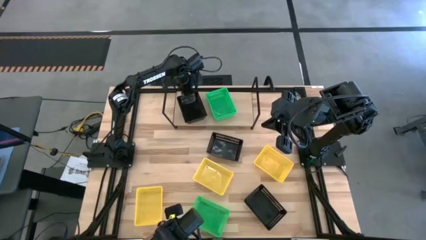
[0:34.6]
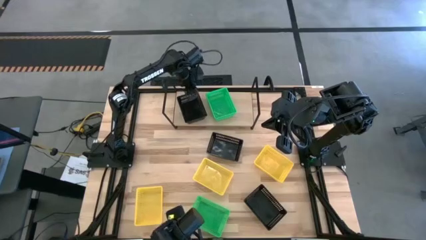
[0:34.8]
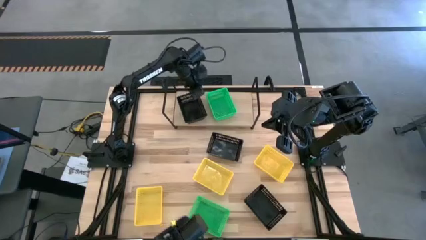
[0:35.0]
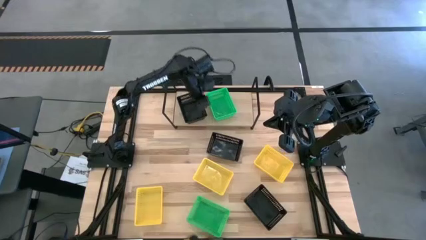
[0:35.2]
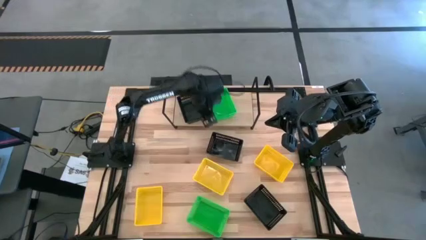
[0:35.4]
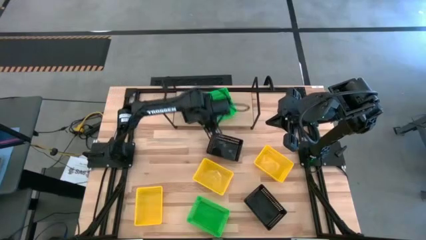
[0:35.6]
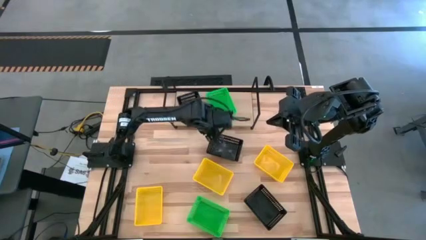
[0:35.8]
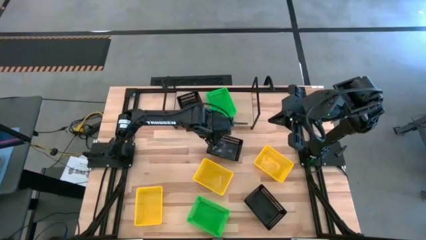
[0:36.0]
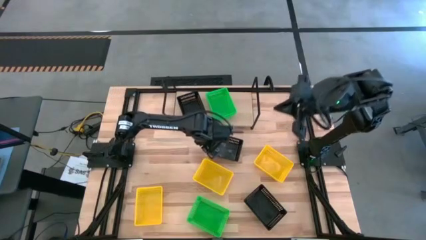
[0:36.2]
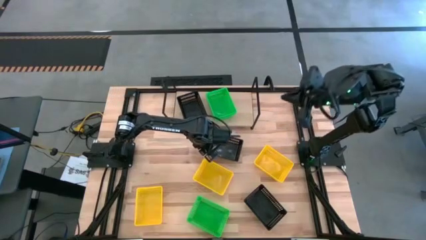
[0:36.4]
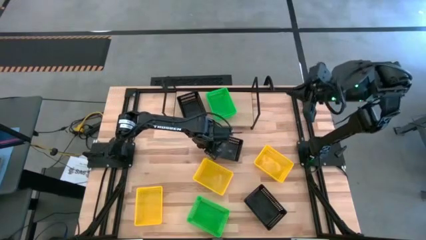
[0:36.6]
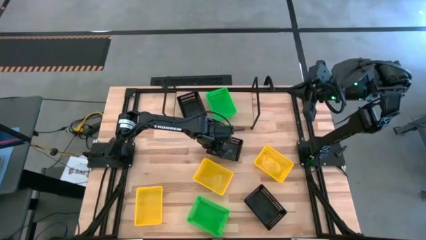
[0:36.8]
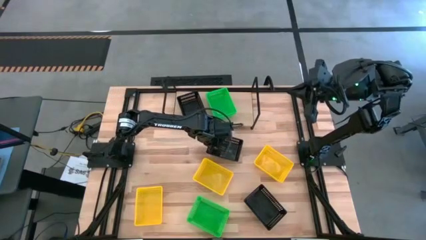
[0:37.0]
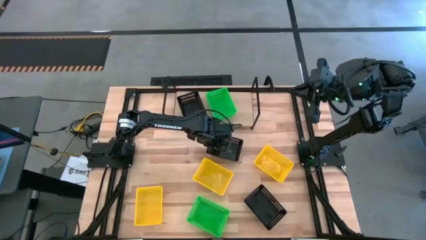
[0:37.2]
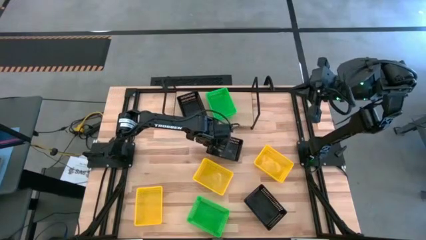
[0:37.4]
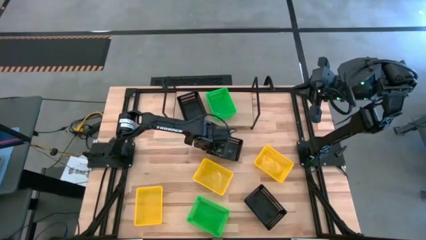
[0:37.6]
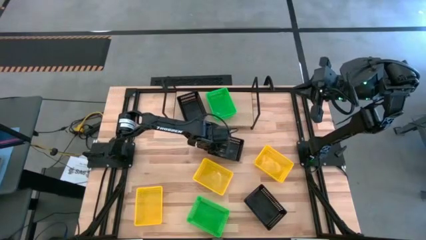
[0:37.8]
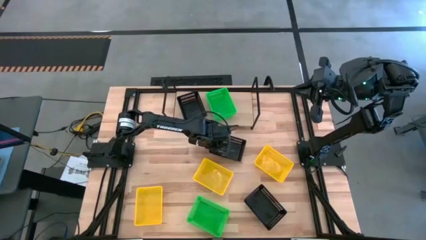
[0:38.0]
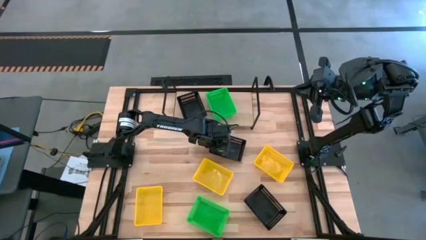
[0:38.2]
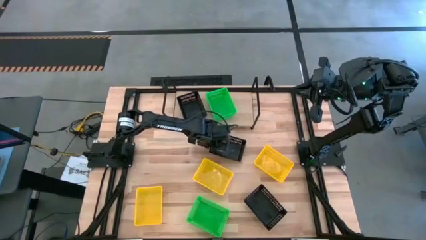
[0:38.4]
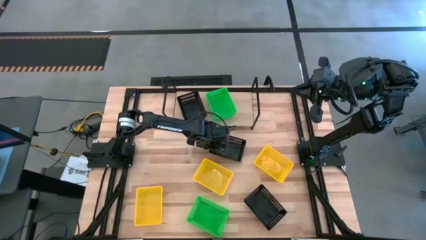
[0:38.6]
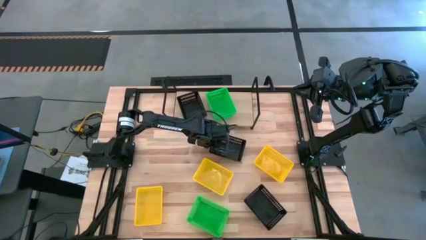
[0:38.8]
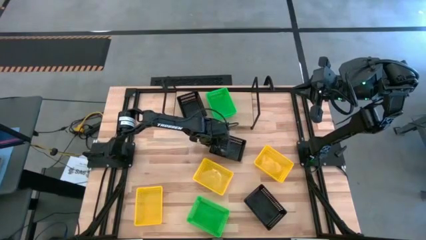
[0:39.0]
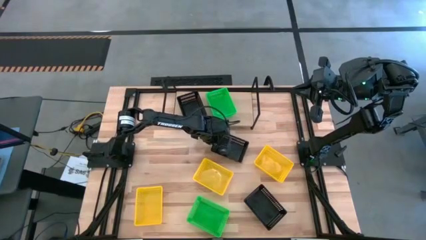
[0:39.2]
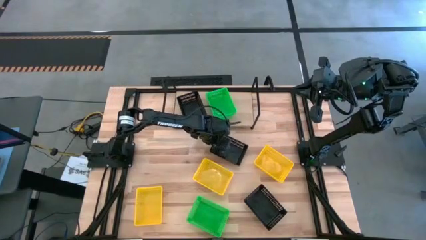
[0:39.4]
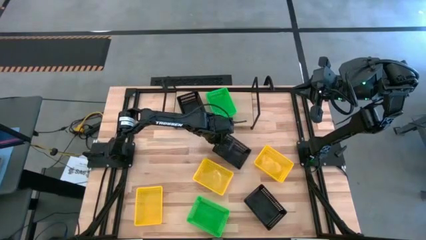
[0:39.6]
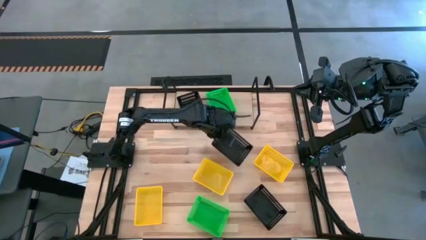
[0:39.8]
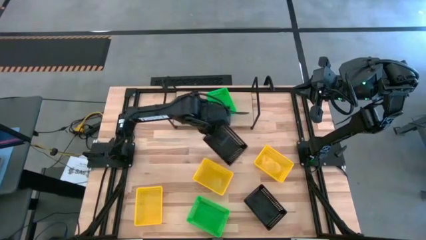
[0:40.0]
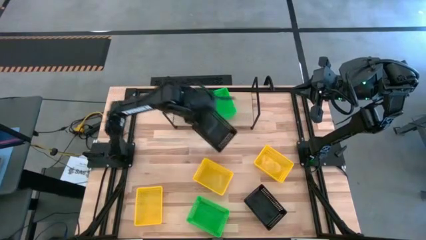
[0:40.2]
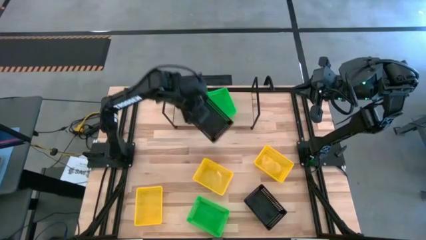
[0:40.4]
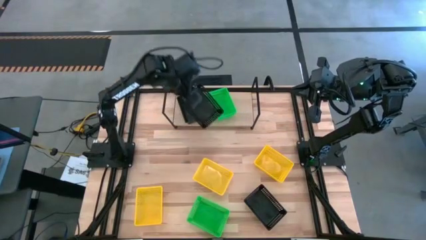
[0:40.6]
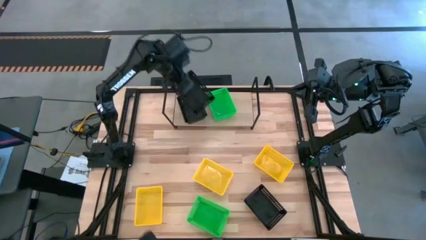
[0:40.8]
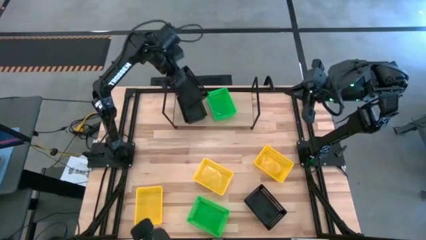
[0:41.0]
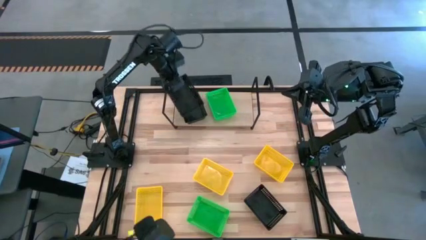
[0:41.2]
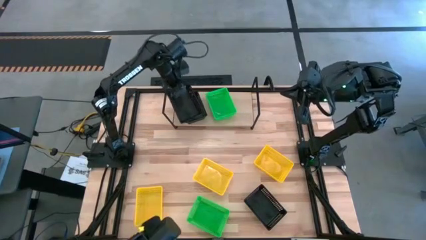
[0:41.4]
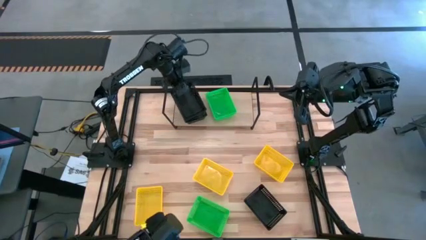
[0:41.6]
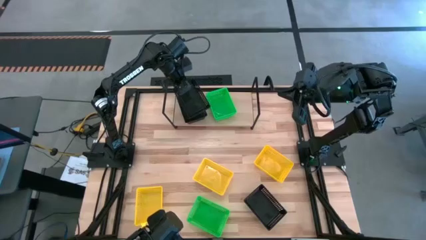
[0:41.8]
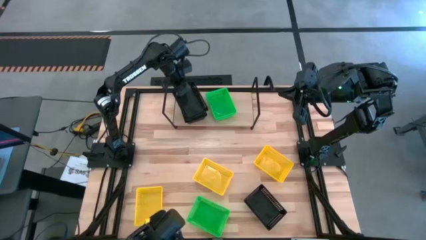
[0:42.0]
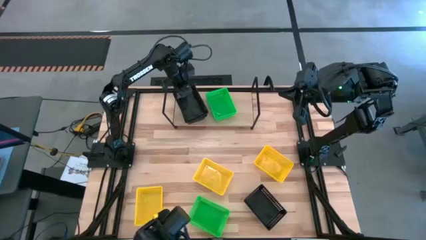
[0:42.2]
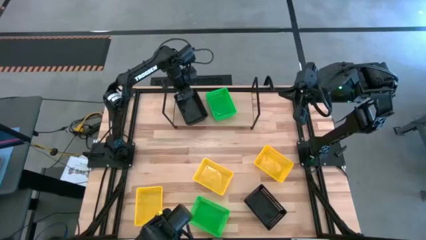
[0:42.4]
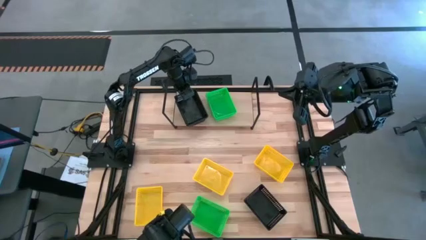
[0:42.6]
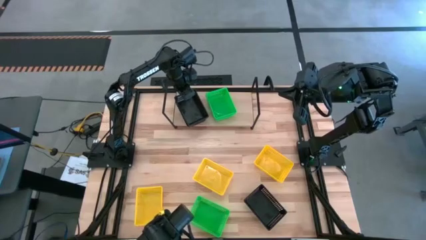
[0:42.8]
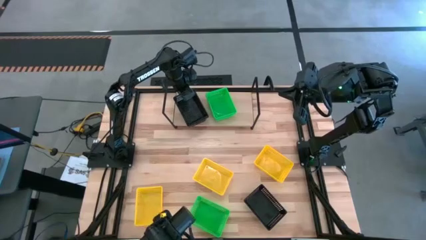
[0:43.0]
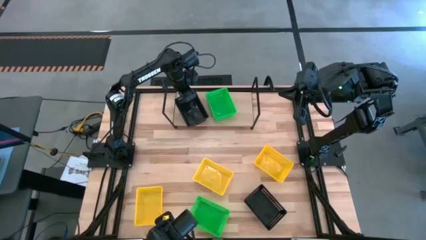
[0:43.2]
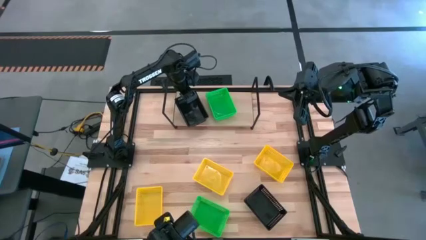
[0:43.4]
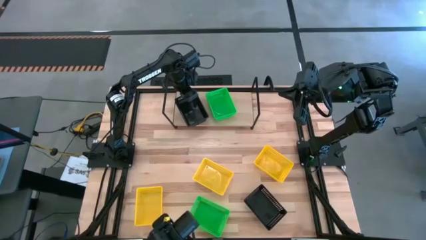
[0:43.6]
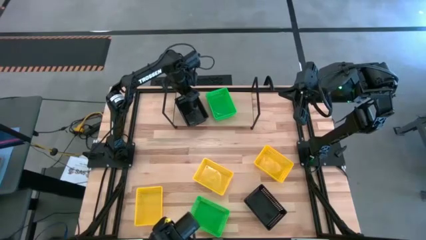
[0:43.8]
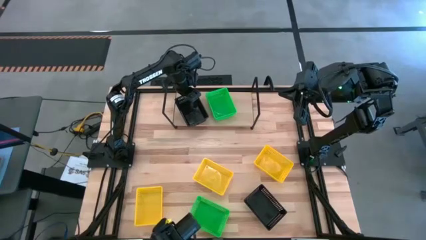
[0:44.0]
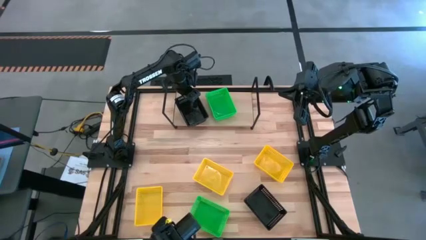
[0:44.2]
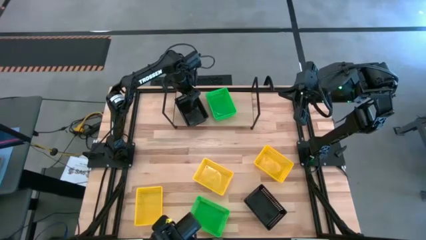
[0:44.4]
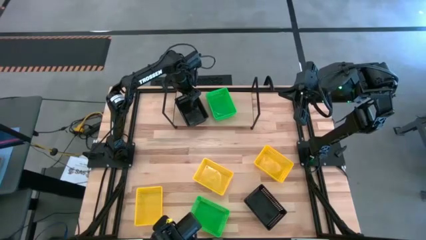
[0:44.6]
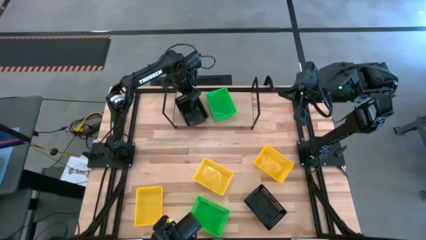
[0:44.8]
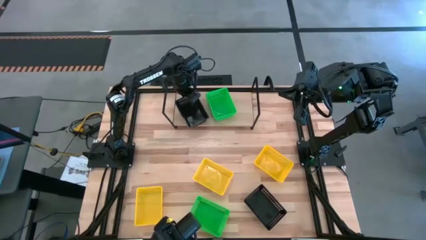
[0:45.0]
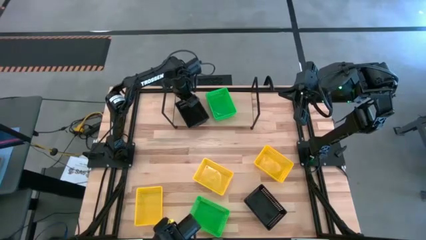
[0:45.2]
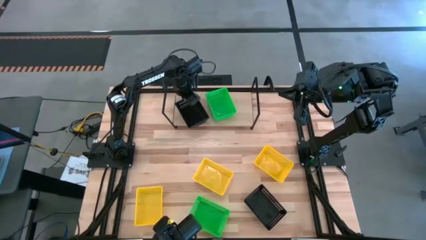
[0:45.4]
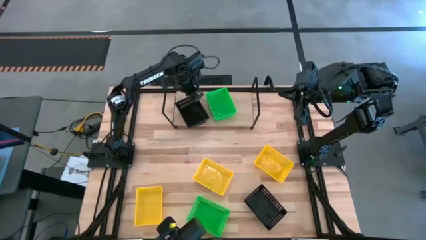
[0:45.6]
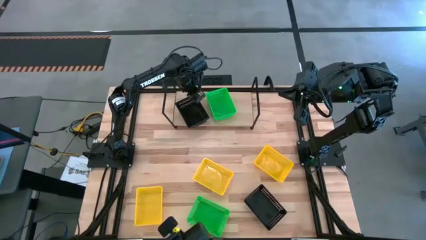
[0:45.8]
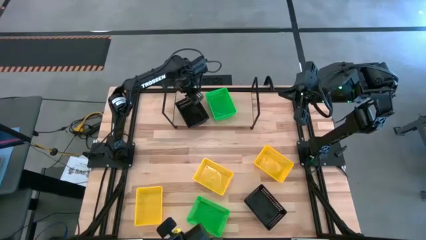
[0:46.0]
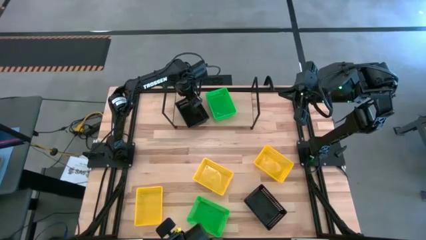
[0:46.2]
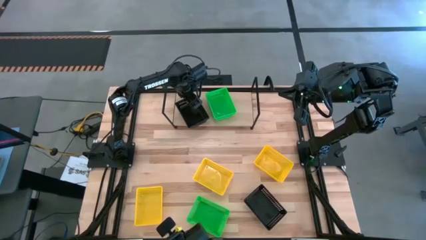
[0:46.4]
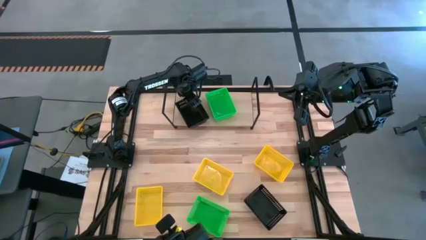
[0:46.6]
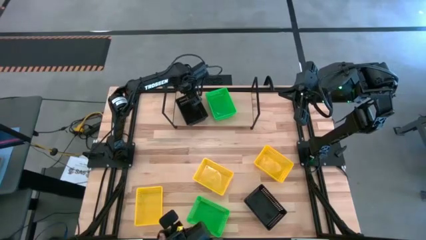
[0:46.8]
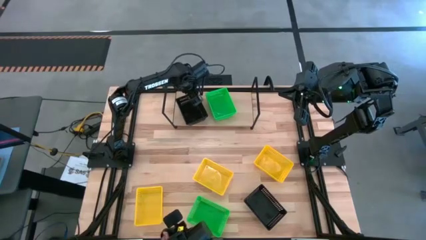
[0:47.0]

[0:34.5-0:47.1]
Task: Stack baskets on shelf by color
Stack the top black bin on top of the black bin

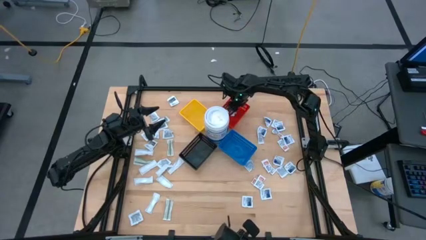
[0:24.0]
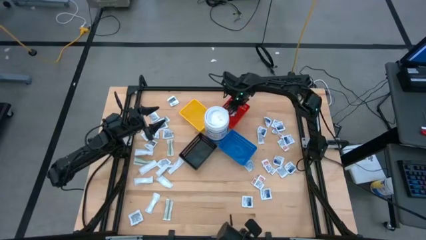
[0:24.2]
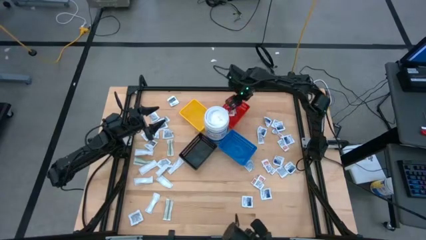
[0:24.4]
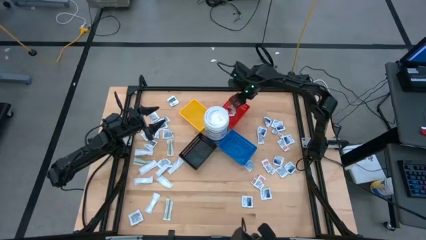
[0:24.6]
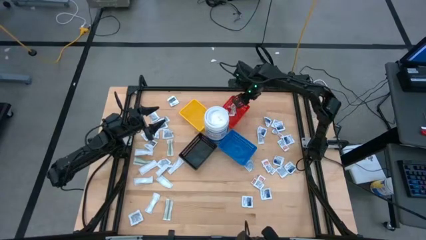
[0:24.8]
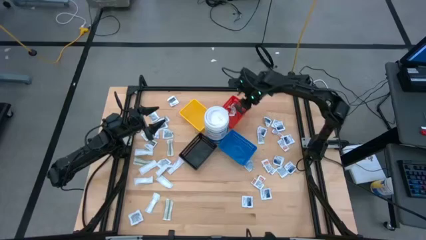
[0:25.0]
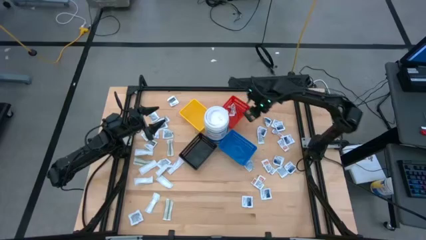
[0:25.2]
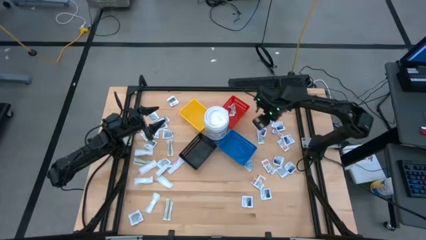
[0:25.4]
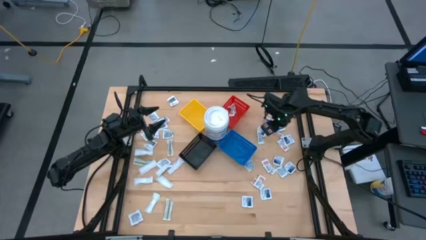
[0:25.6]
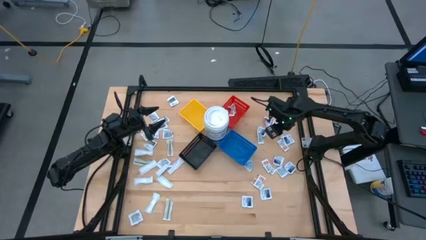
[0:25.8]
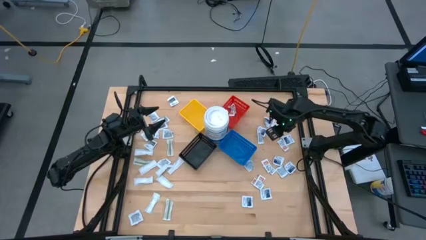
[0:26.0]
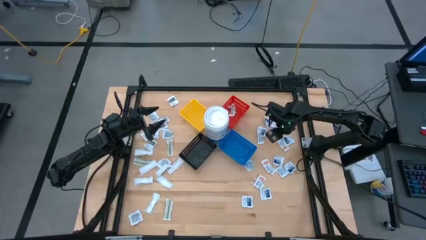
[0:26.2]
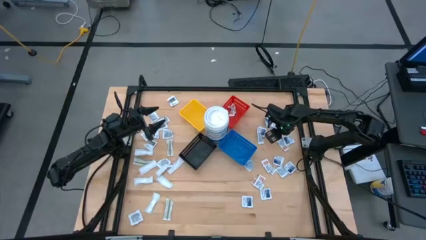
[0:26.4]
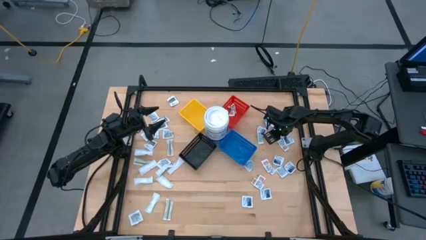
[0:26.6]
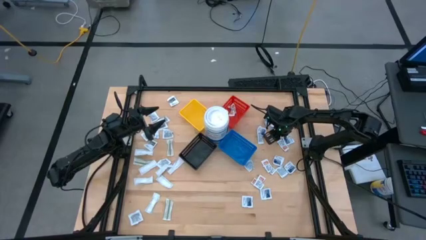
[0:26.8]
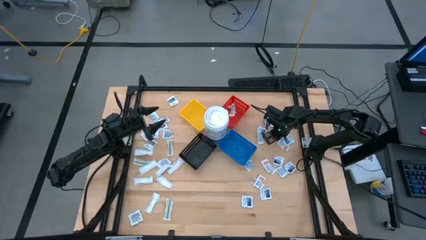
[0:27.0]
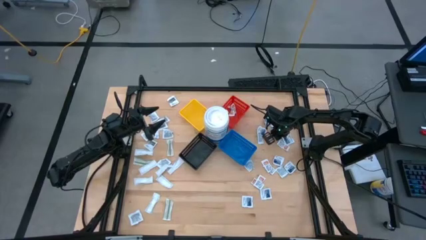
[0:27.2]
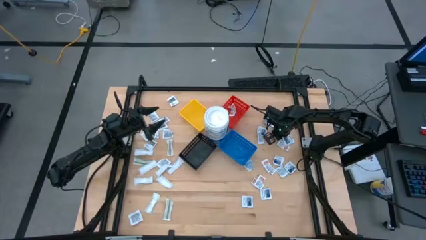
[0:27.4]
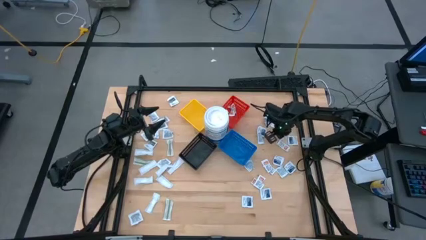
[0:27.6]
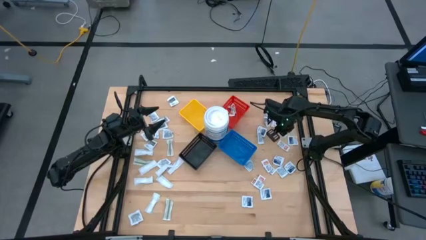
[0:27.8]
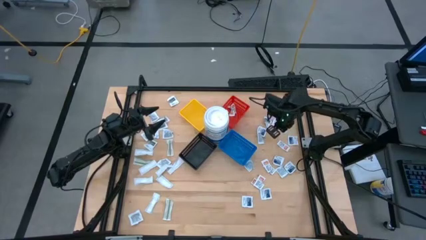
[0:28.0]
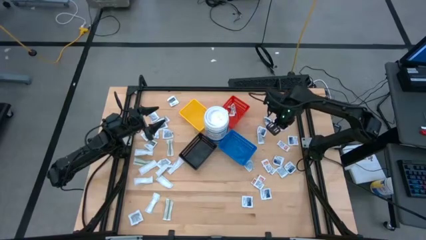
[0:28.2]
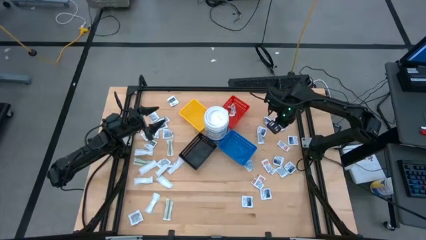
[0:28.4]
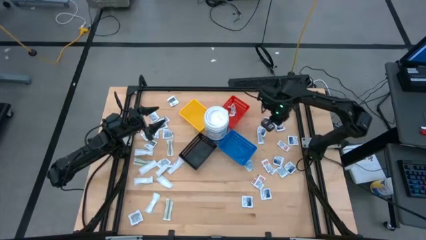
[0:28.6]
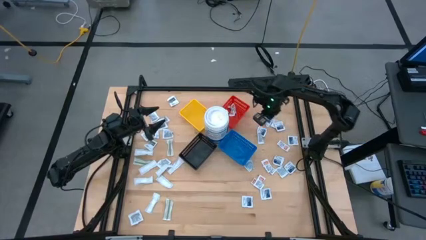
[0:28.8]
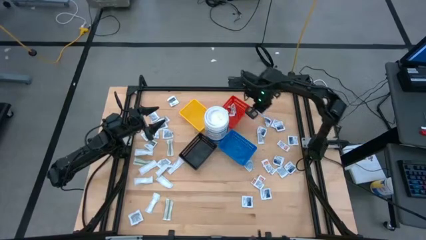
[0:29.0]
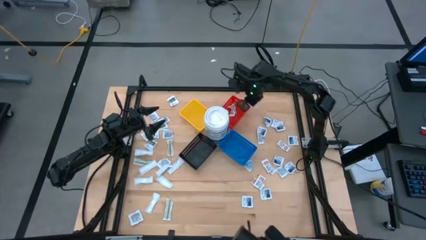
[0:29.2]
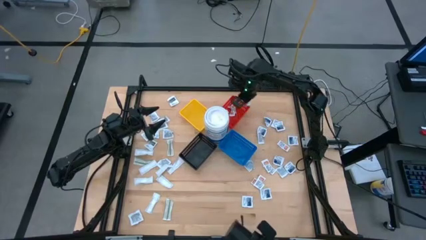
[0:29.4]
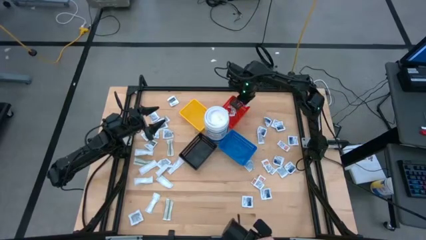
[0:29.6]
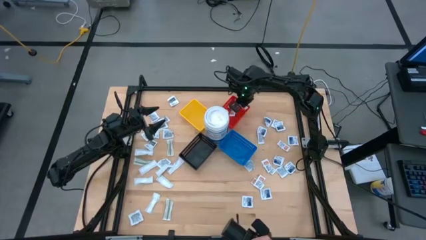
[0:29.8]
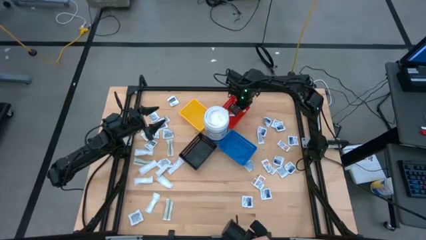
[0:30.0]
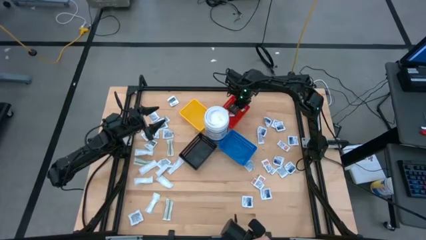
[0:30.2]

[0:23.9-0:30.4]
Task: Pick & Place First Aid Supplies
Put the ointment pack into the red bin
